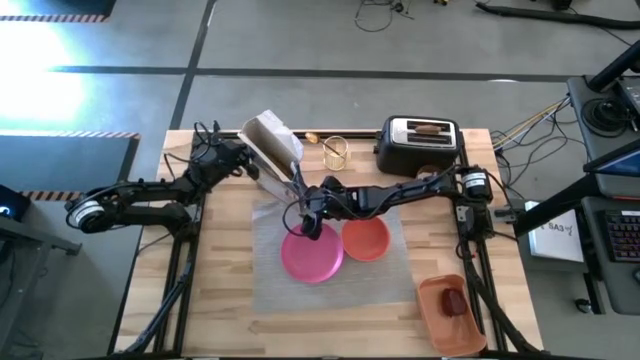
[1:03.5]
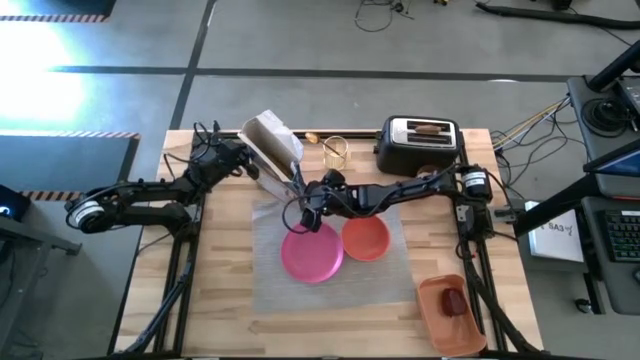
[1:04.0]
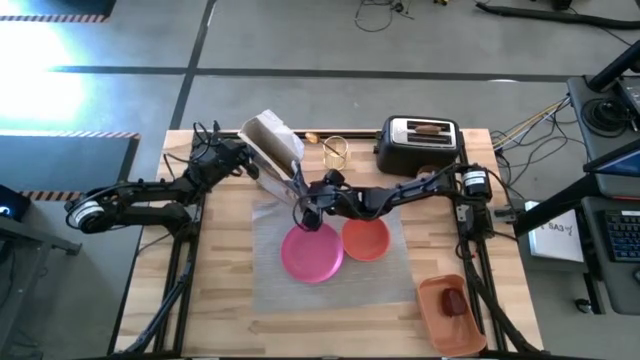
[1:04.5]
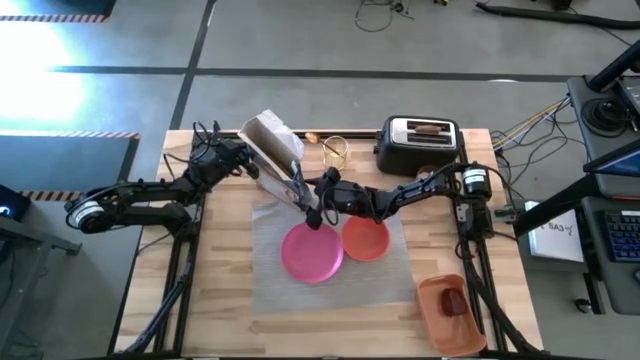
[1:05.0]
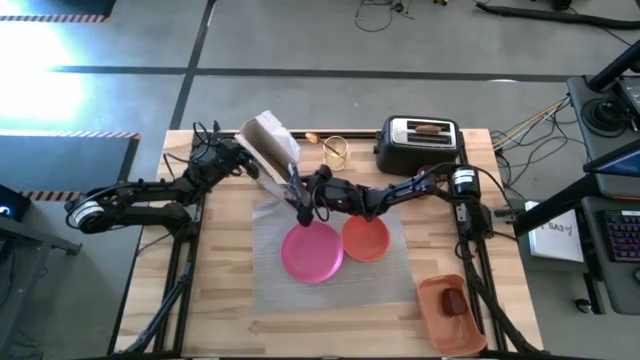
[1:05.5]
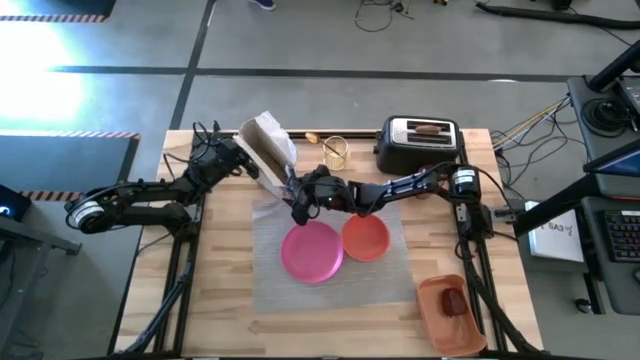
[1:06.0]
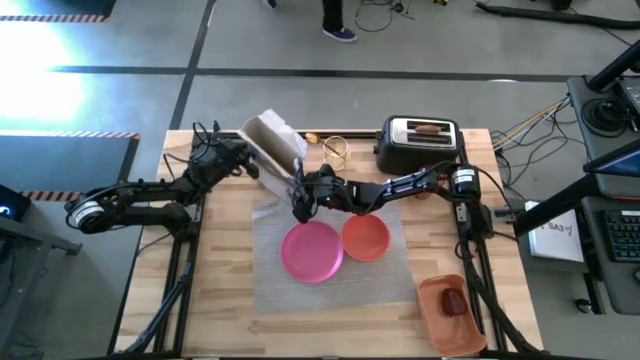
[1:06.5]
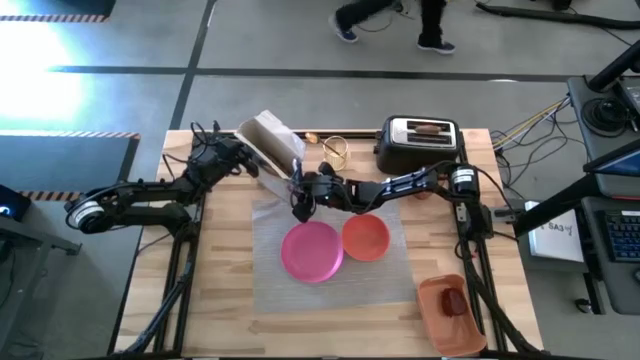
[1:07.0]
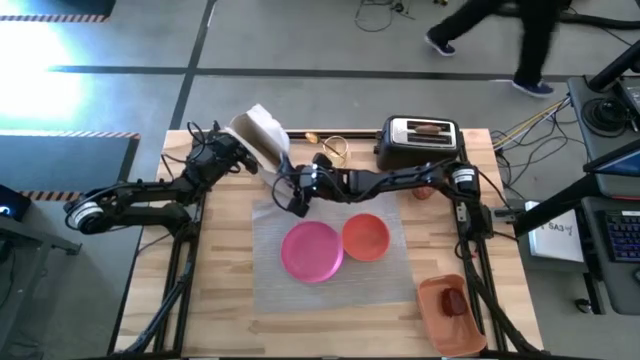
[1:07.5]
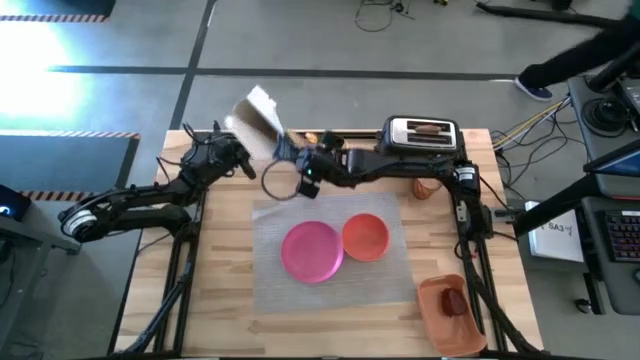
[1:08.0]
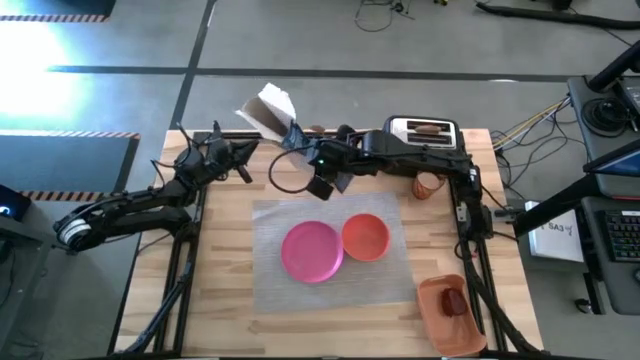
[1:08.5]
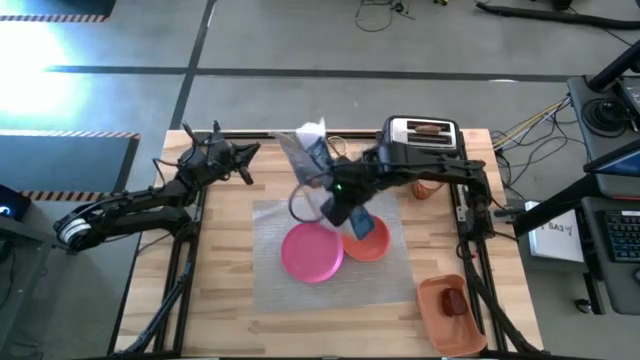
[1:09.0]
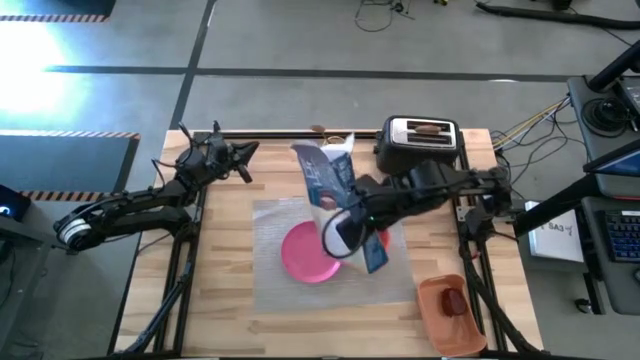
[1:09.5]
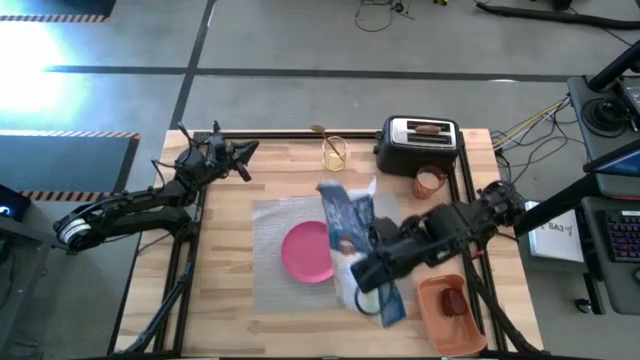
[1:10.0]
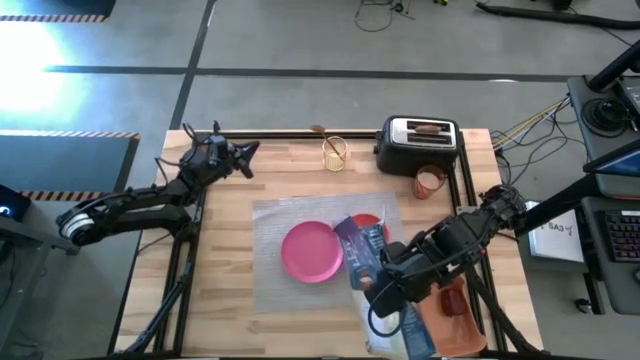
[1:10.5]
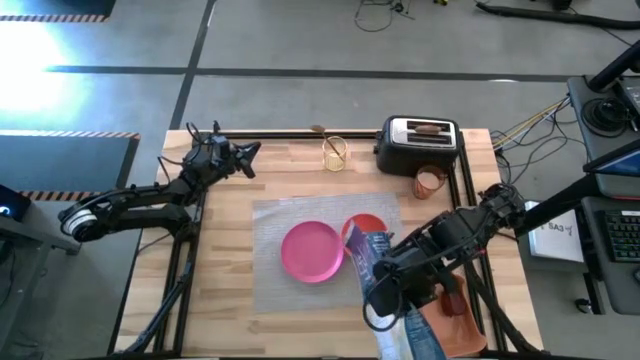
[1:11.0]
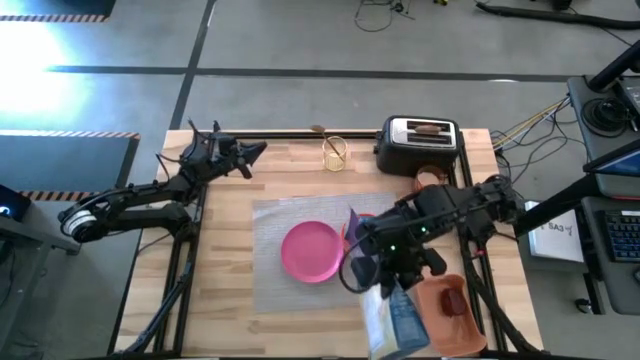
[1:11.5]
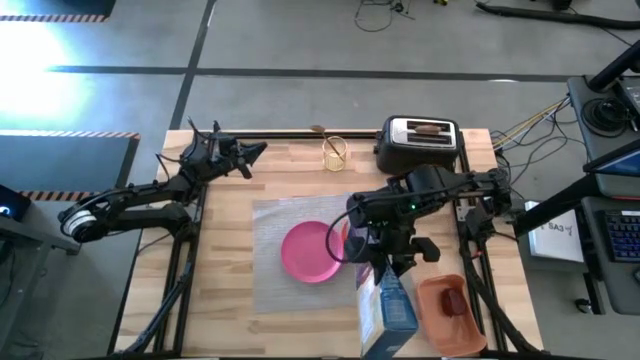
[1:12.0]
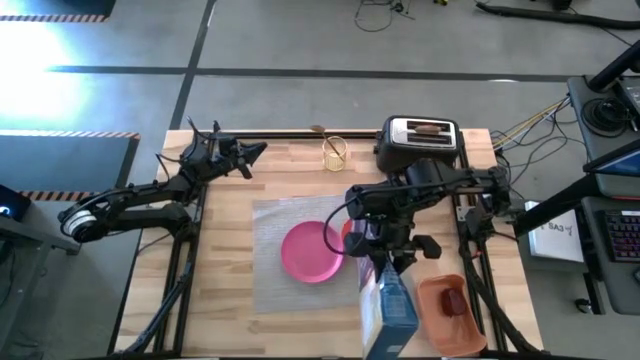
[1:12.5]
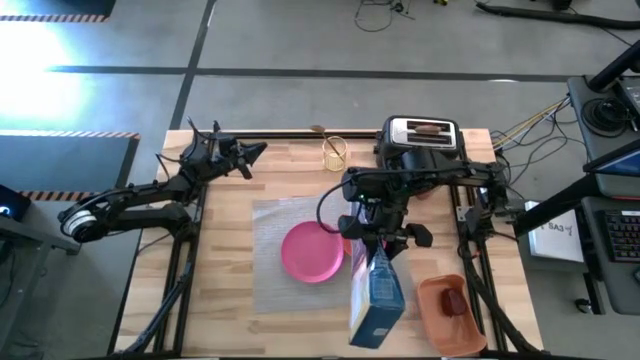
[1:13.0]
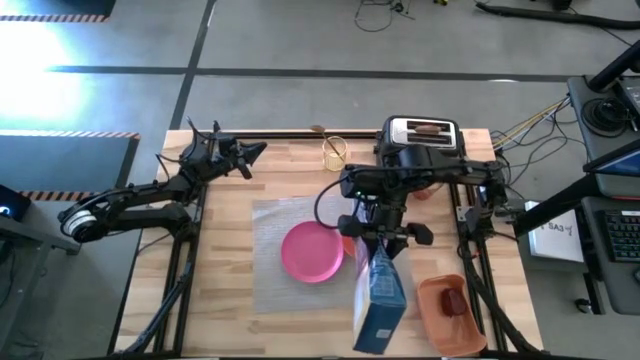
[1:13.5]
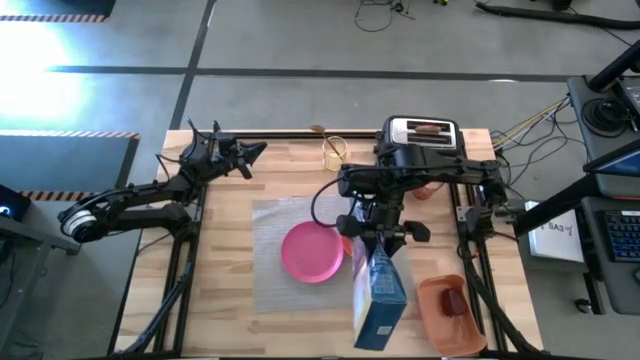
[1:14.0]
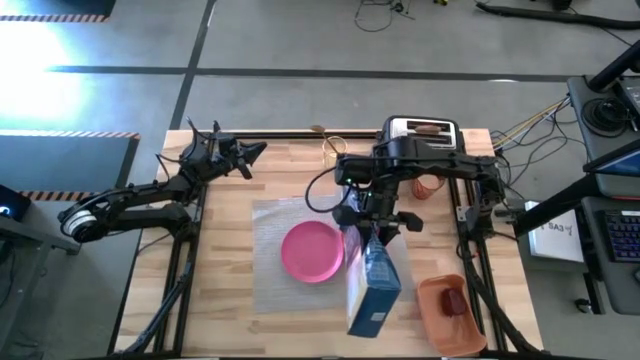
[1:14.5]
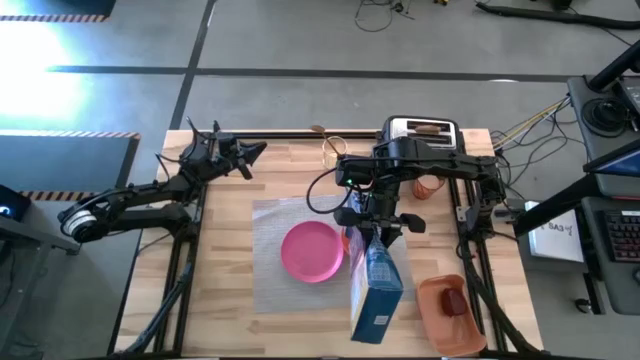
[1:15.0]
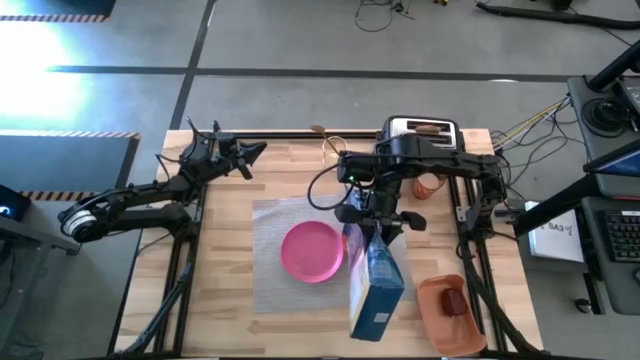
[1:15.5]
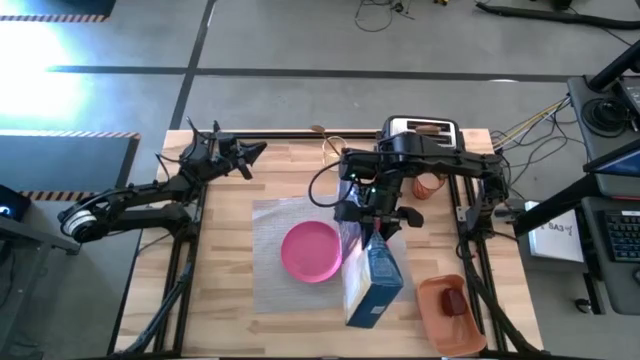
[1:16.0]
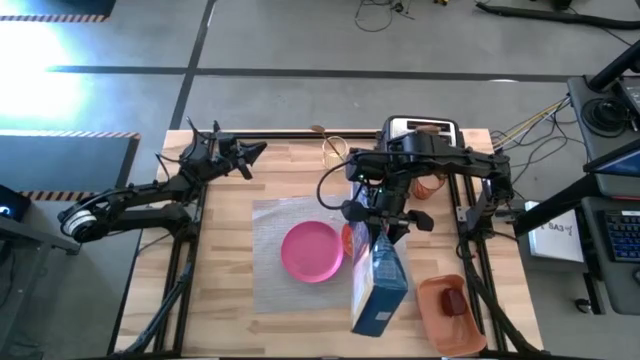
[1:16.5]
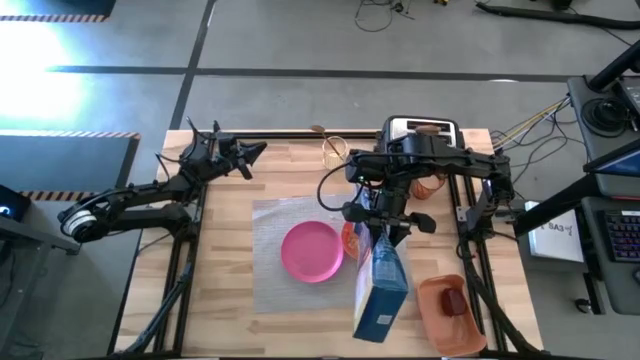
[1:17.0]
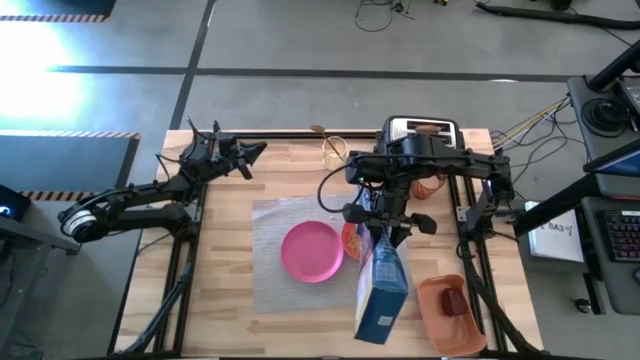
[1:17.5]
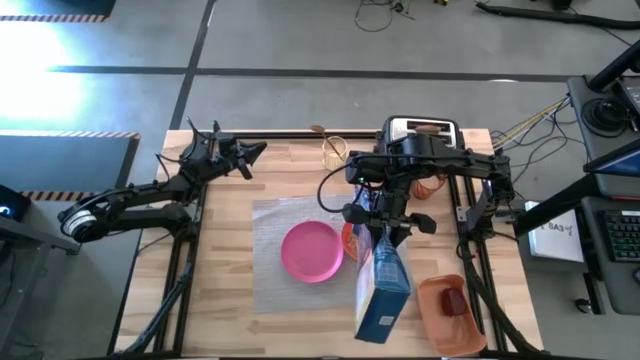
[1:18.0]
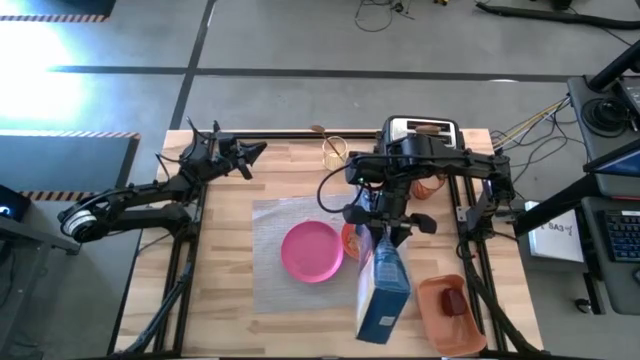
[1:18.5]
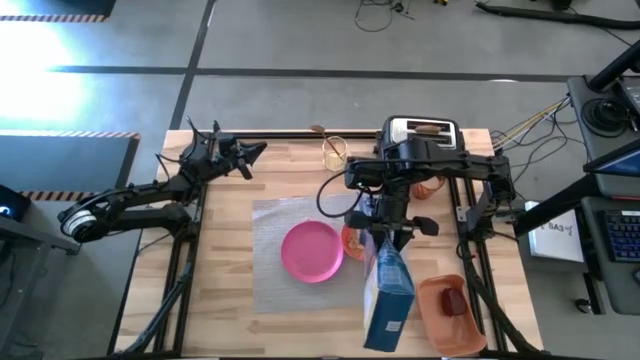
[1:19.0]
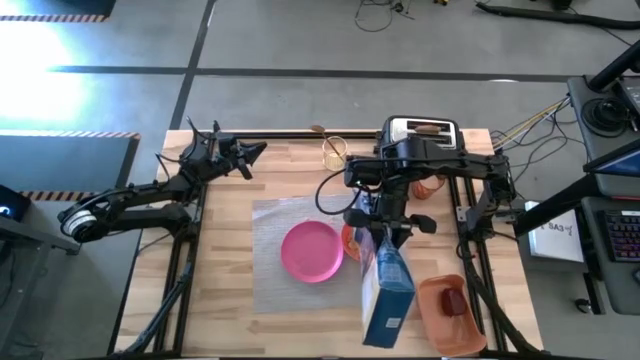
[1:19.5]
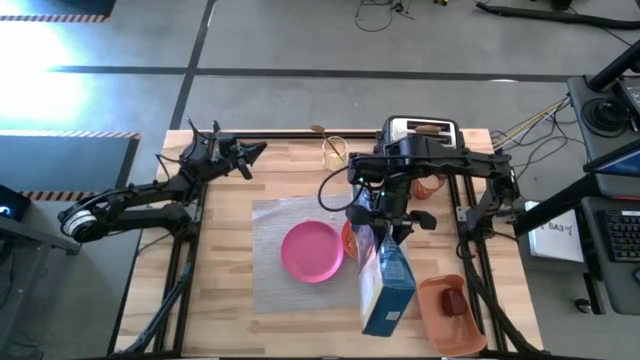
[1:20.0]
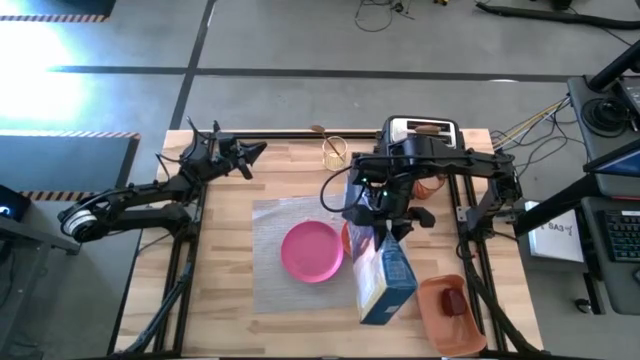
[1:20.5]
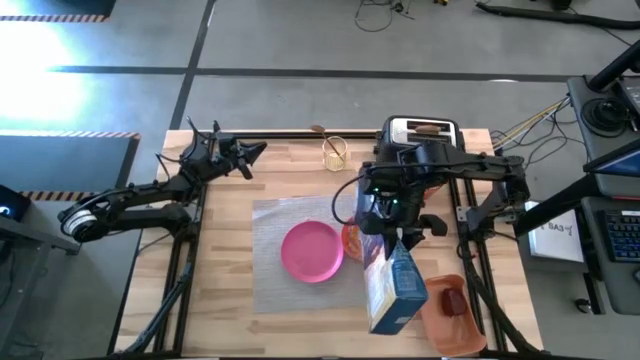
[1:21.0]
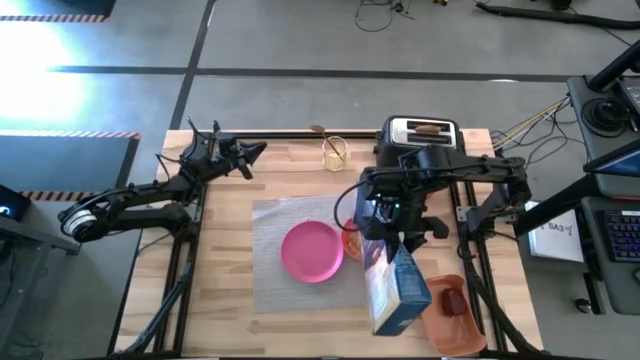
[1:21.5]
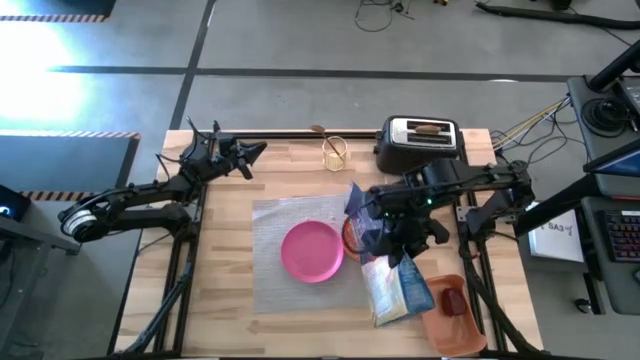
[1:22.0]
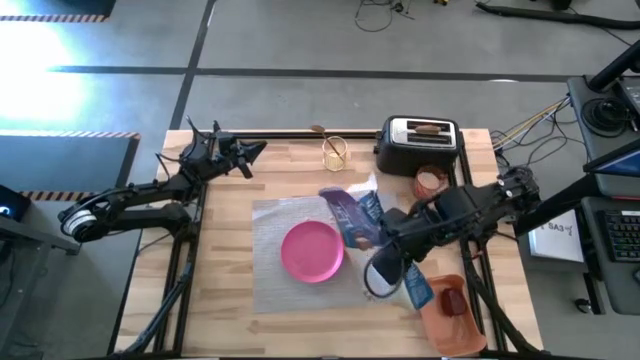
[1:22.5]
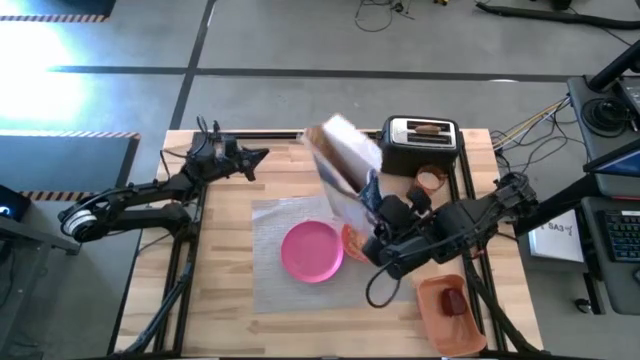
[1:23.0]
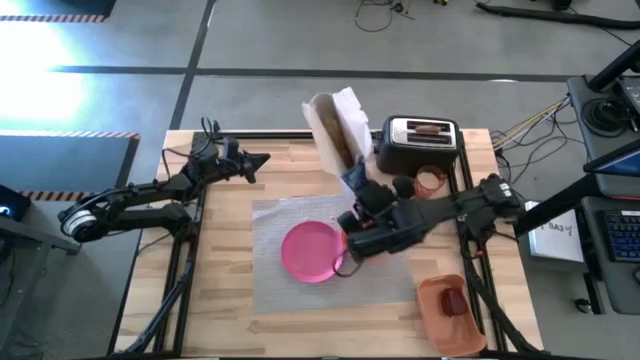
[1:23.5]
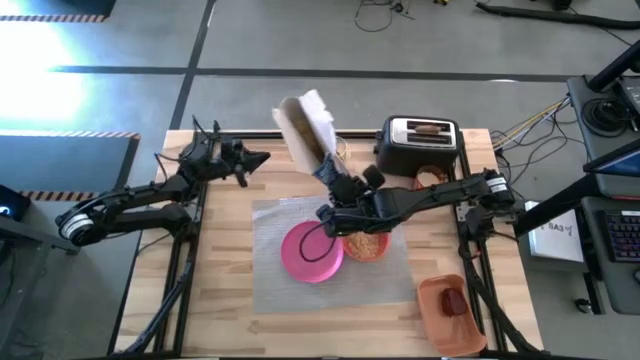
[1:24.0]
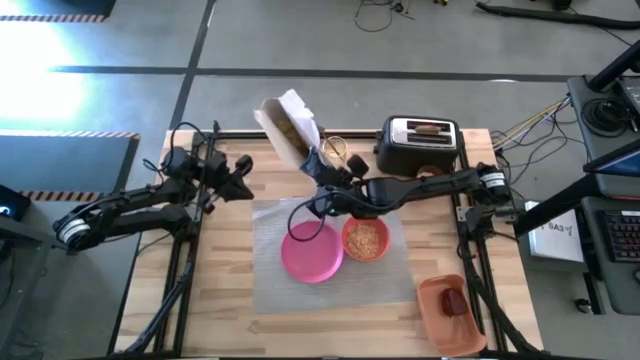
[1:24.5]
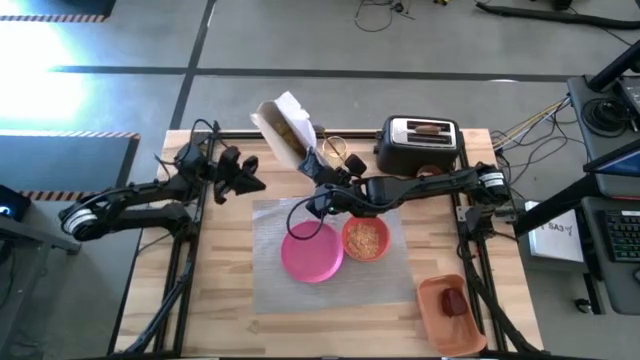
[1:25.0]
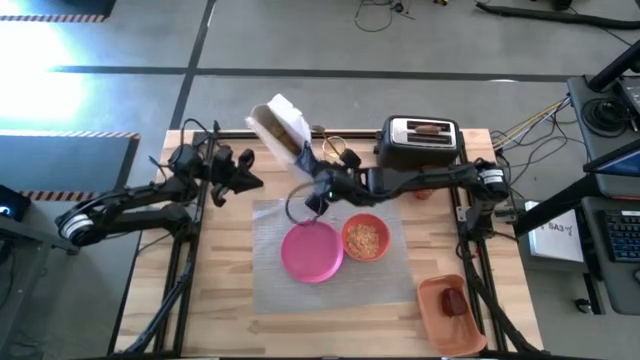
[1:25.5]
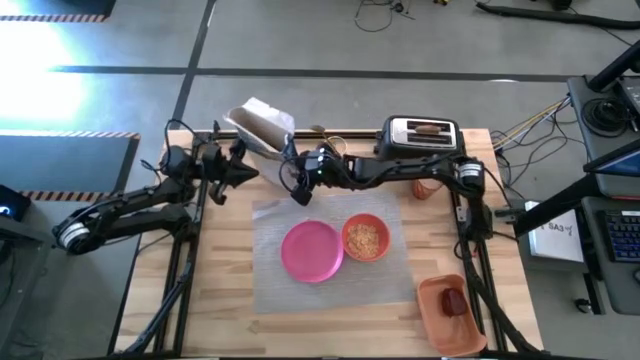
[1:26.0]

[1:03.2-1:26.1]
Task: Arrange a breakfast setting
Pour the cereal from the blue cereal box into the orange bowl on the gray table mat
